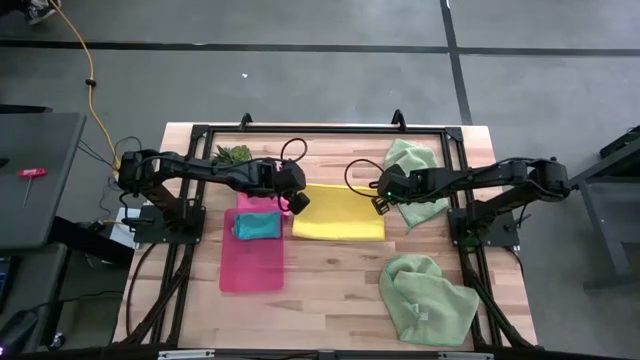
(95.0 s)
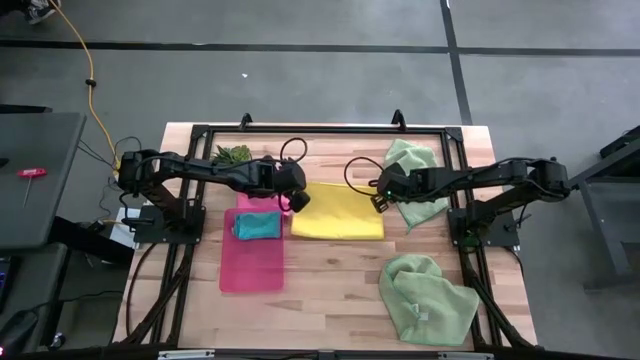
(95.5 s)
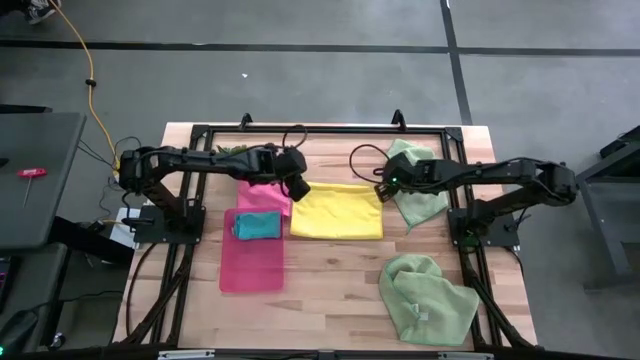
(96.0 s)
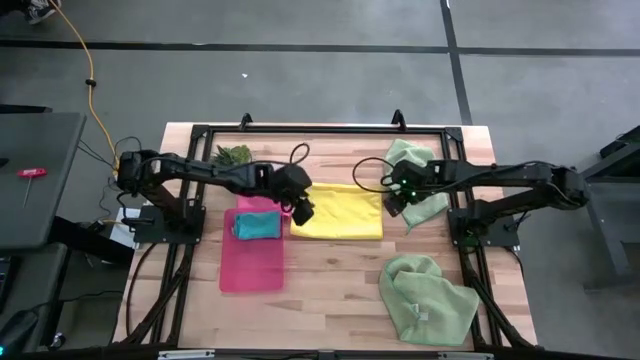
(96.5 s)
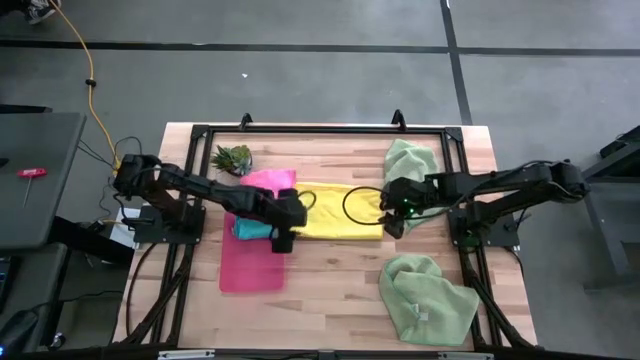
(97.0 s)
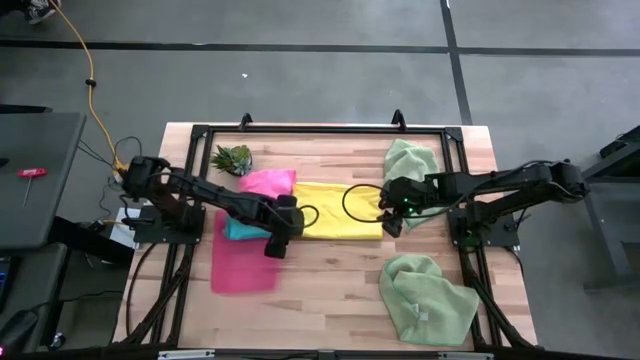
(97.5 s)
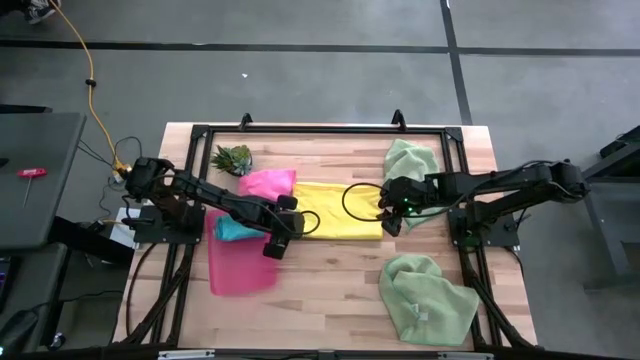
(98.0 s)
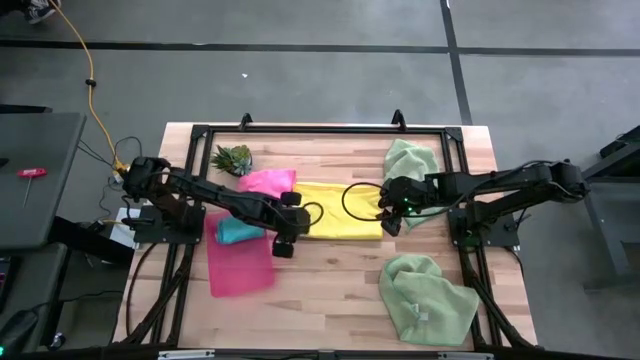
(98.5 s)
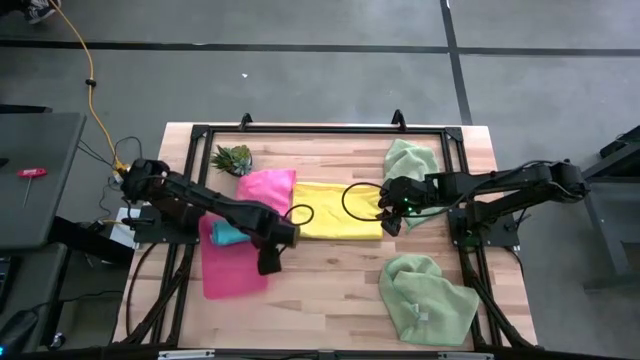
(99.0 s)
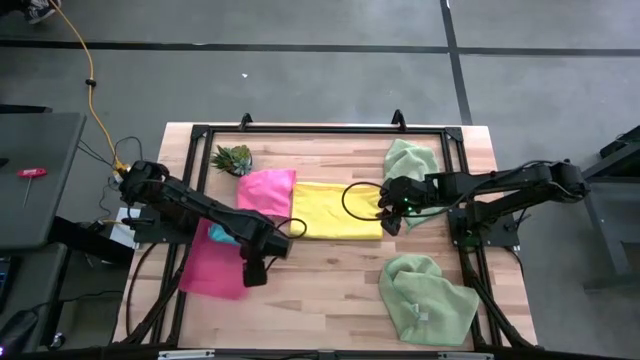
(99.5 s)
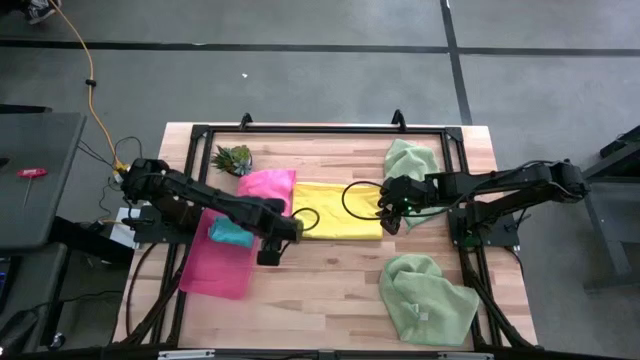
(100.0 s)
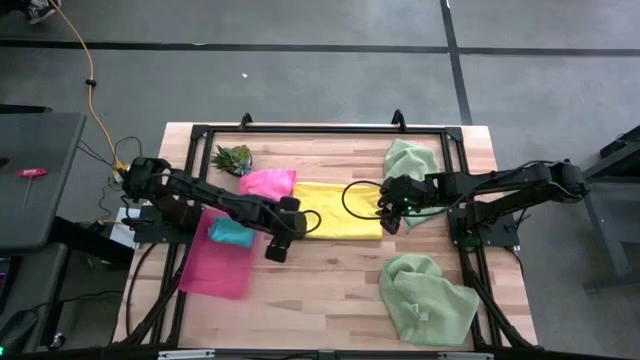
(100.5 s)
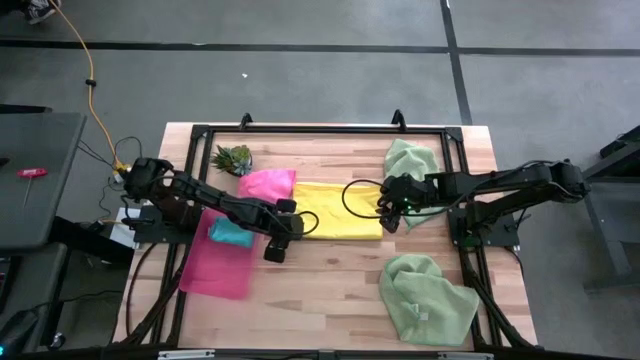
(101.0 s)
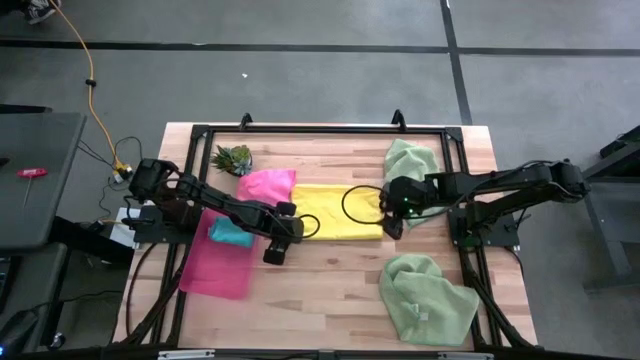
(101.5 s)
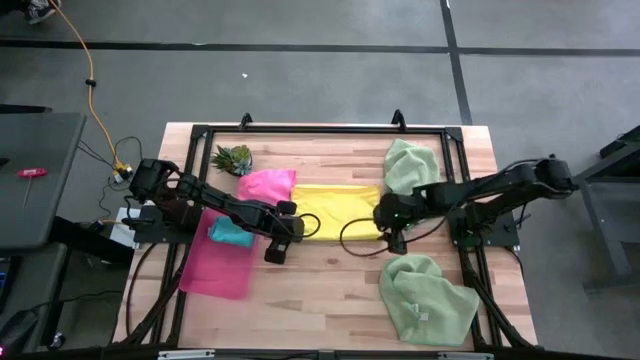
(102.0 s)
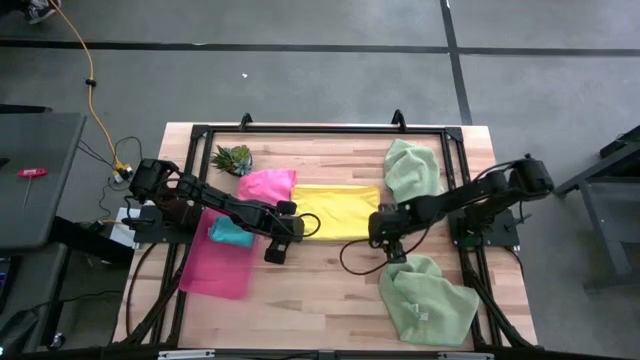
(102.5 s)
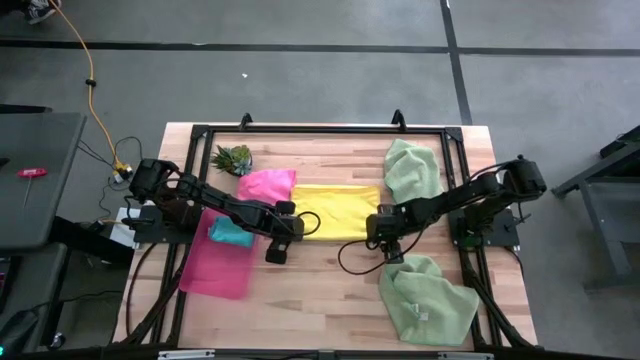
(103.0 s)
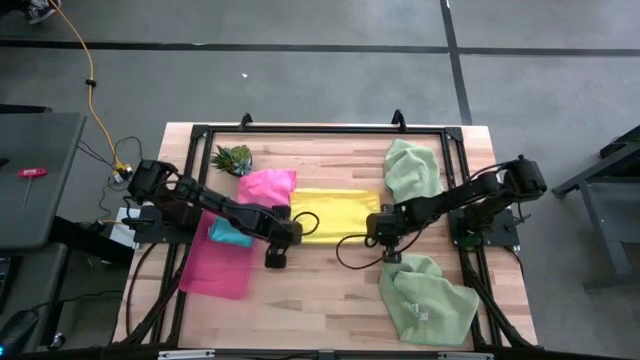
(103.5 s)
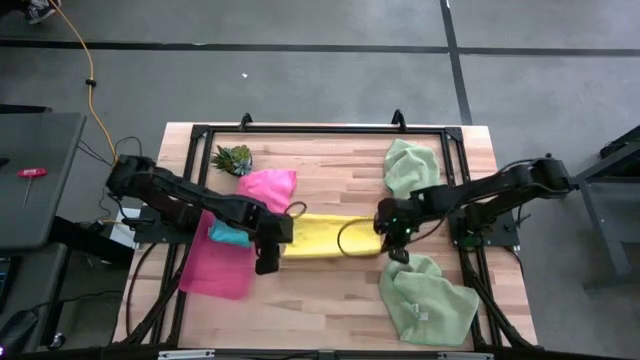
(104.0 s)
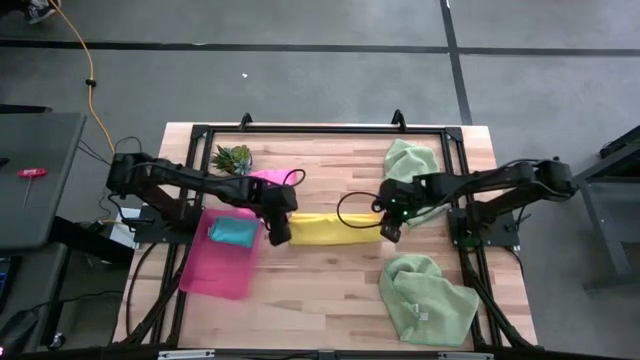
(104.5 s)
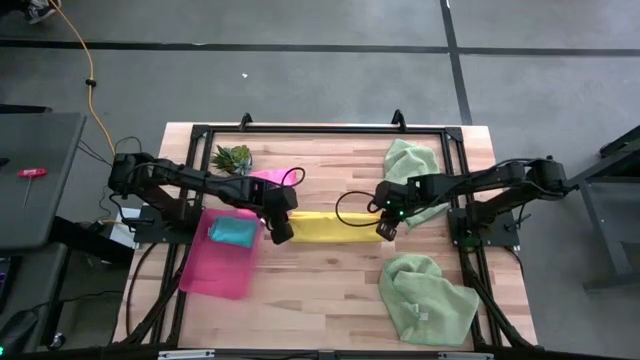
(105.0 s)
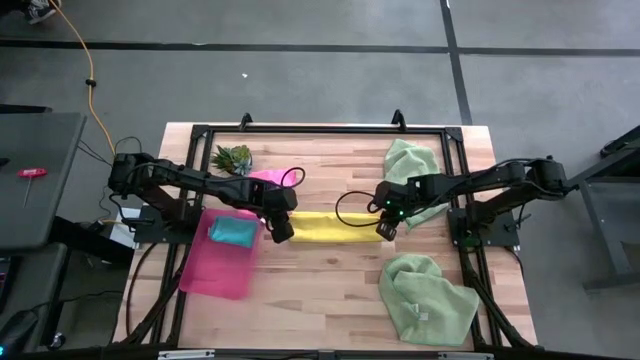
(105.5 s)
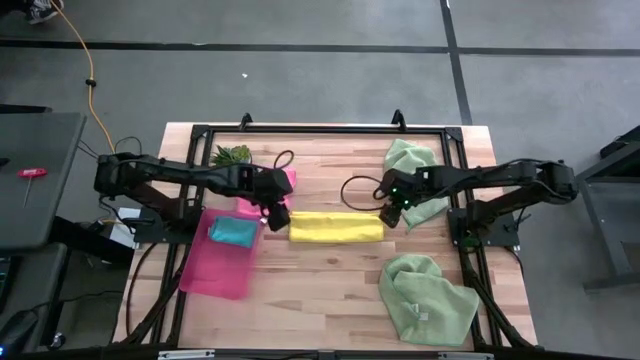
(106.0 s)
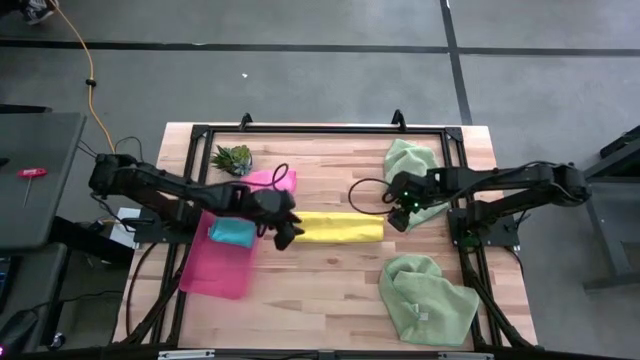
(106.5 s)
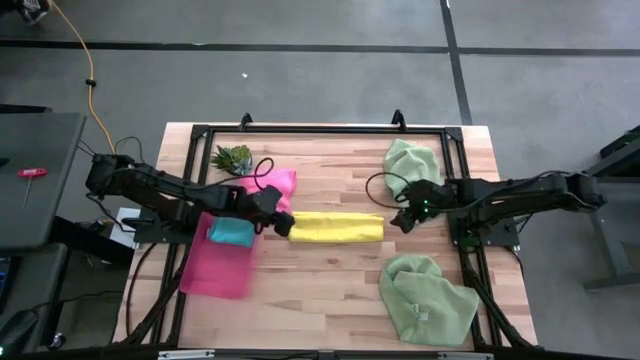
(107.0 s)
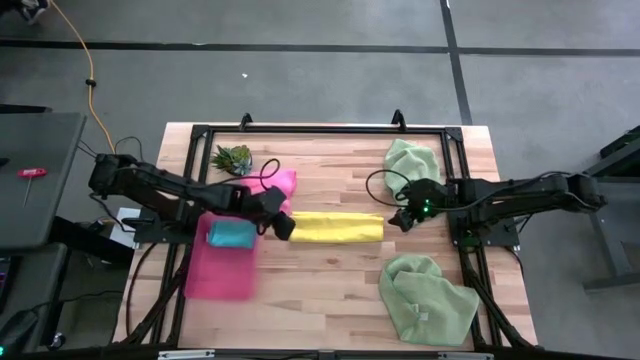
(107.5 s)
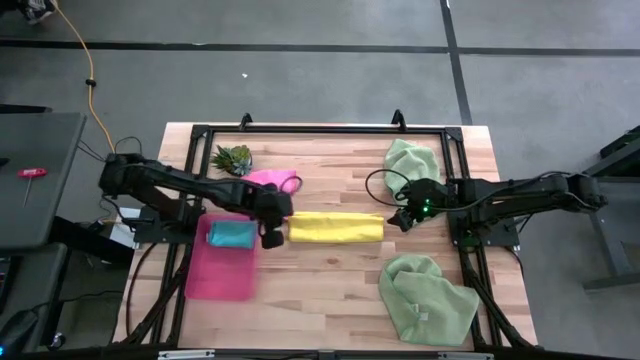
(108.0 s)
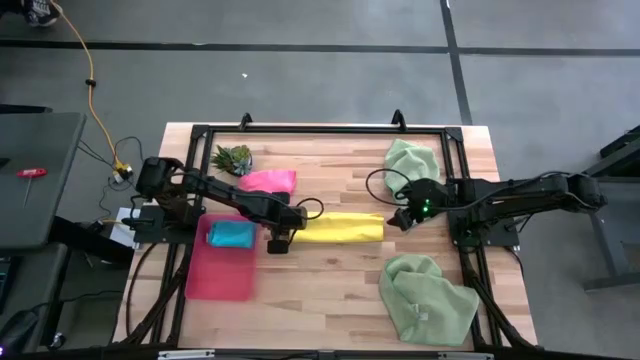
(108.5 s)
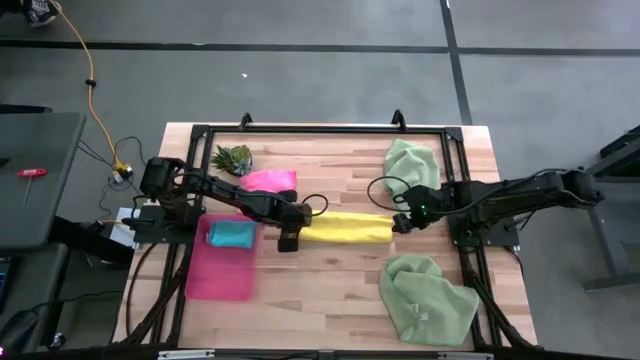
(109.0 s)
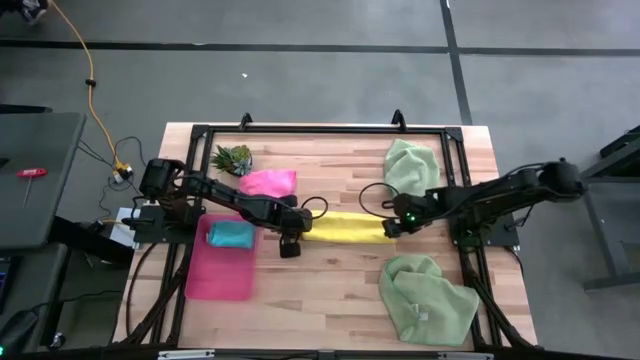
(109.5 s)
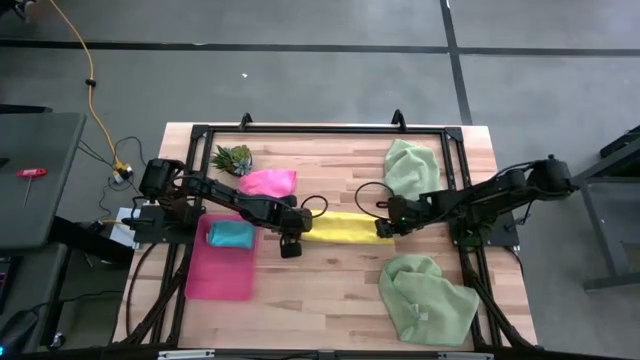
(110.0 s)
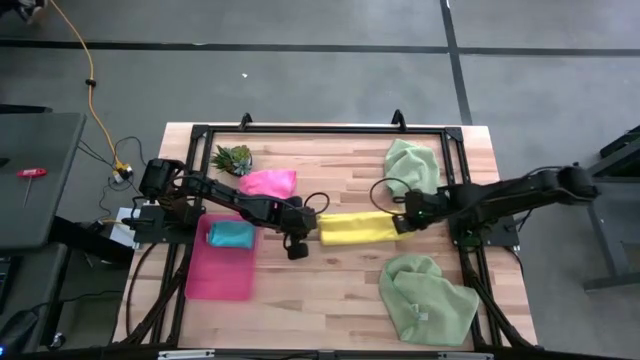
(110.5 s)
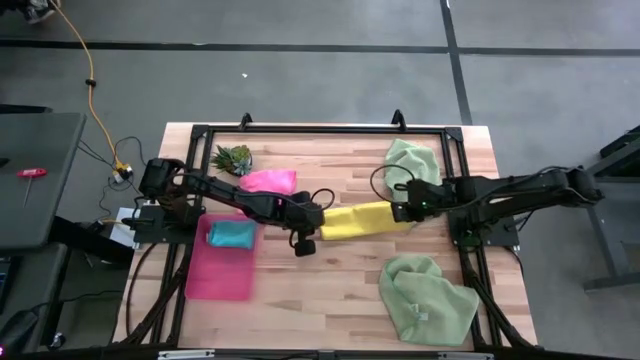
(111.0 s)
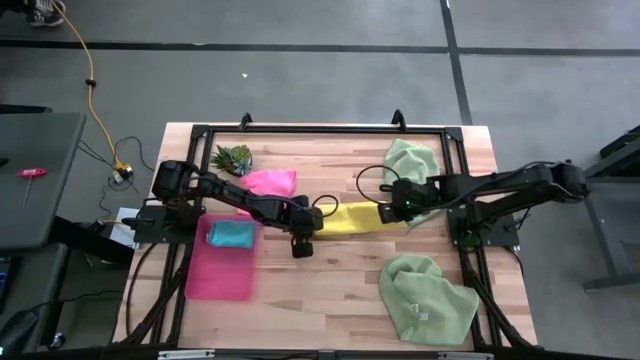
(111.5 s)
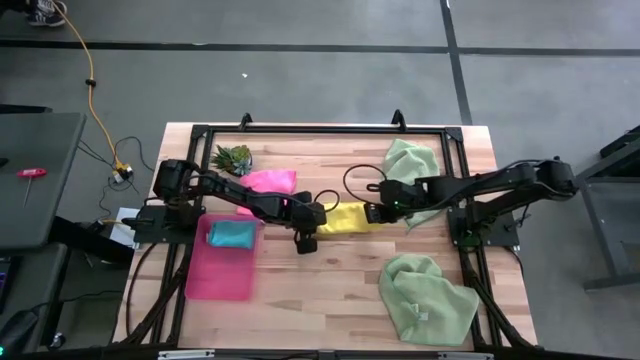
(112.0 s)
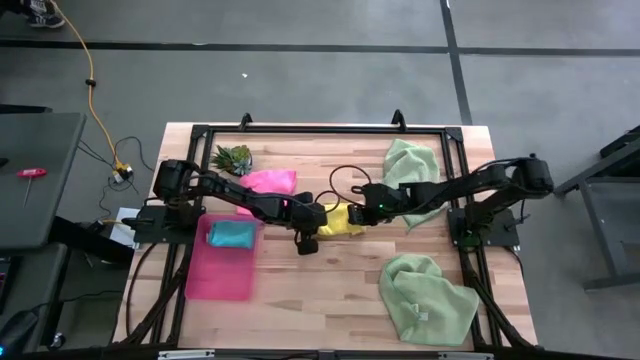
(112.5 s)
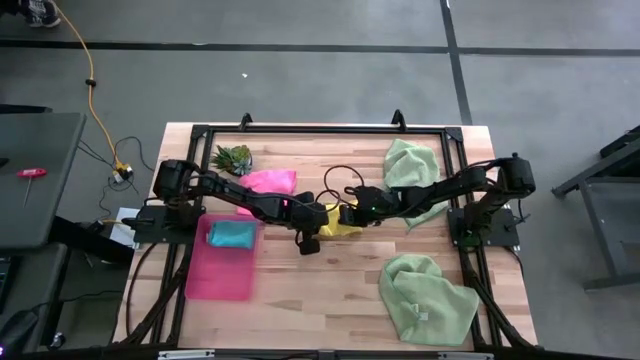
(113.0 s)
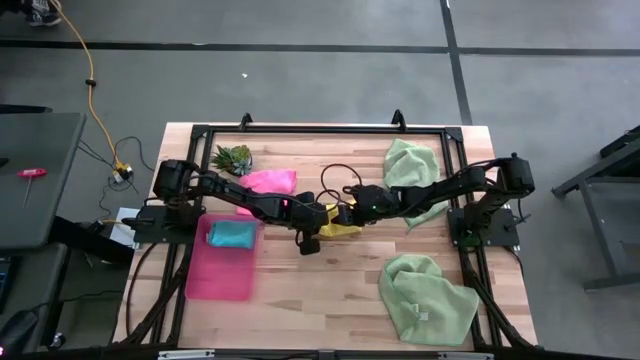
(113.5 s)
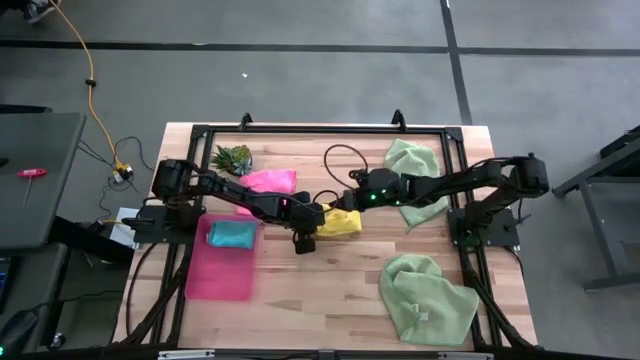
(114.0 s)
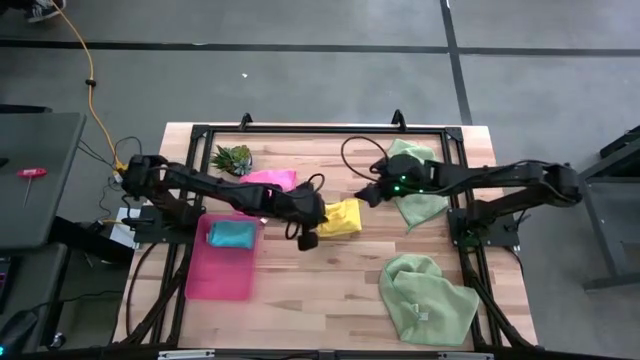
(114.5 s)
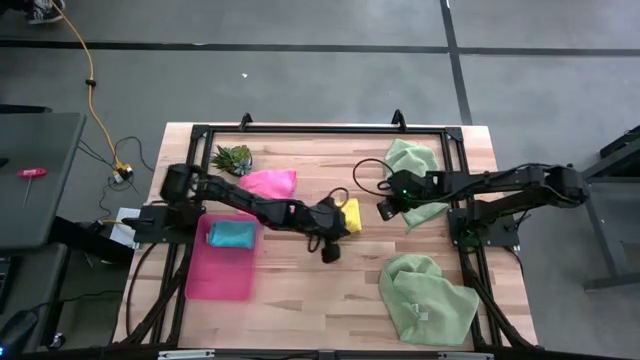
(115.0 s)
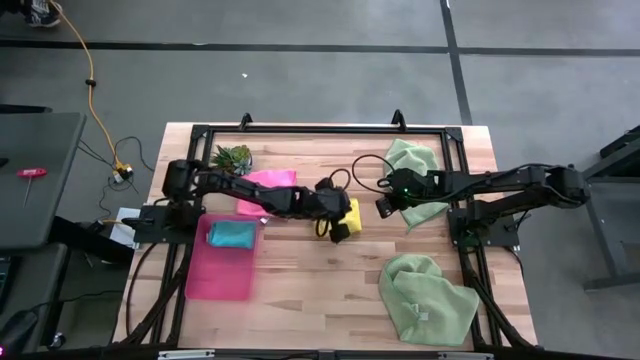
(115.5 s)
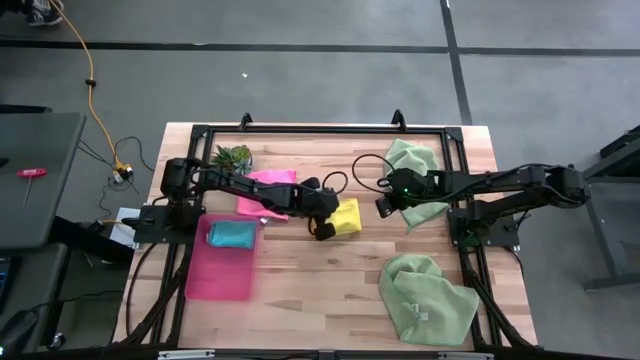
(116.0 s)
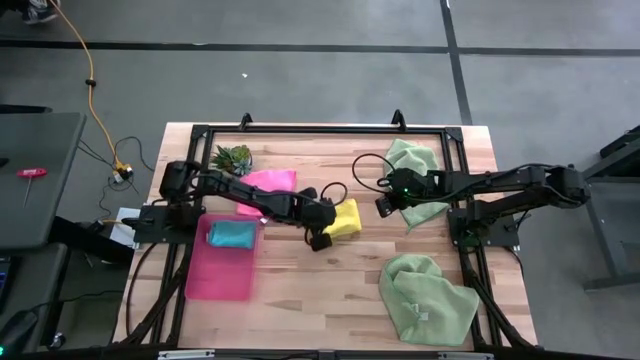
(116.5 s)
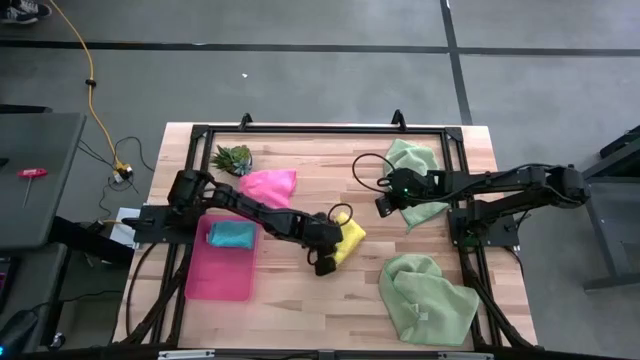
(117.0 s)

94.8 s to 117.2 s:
Task: Fold microfiber towels
Fold the yellow microfiber towel
